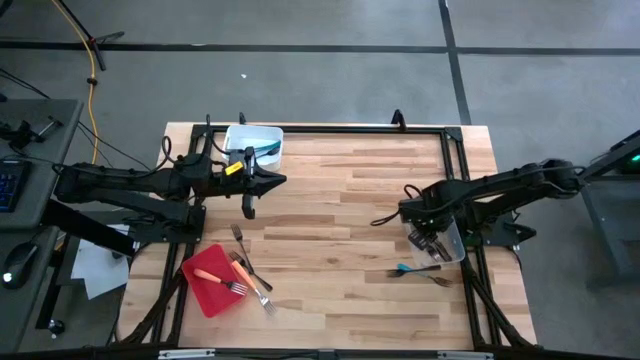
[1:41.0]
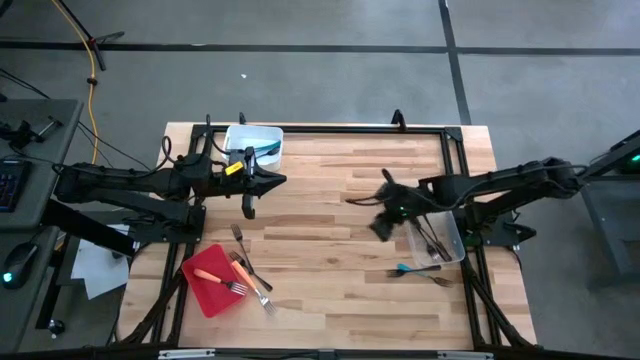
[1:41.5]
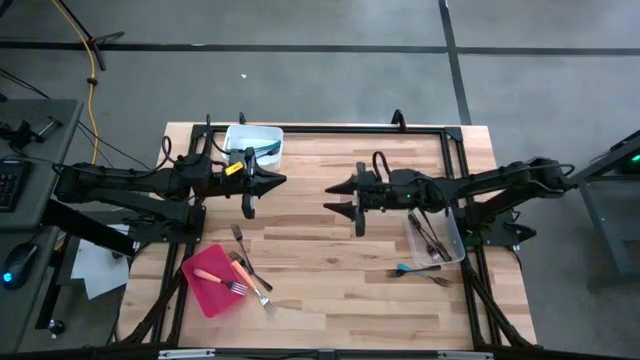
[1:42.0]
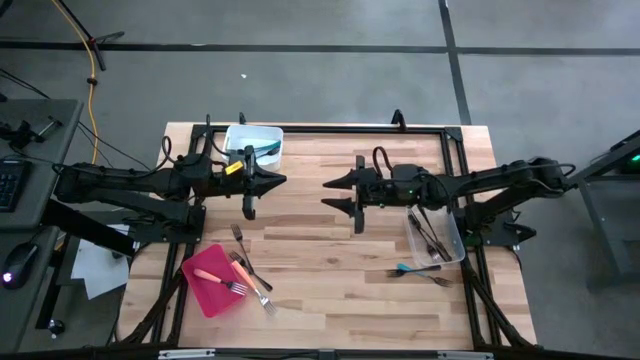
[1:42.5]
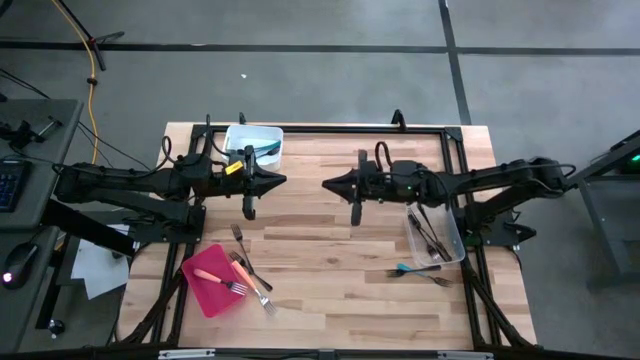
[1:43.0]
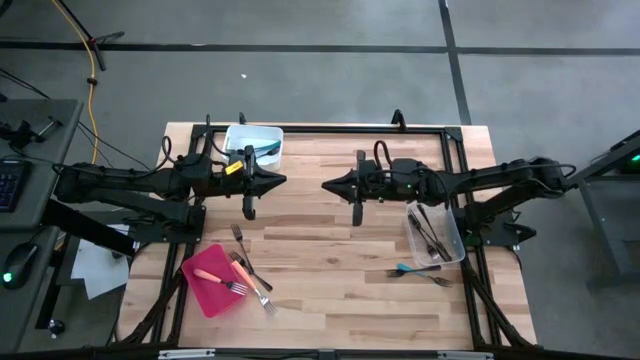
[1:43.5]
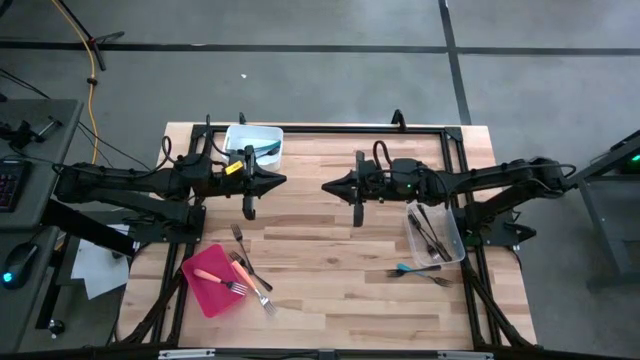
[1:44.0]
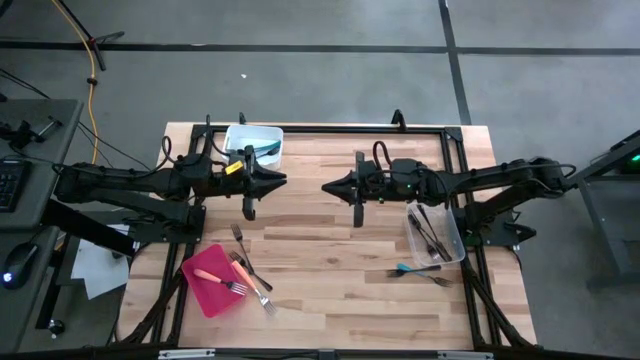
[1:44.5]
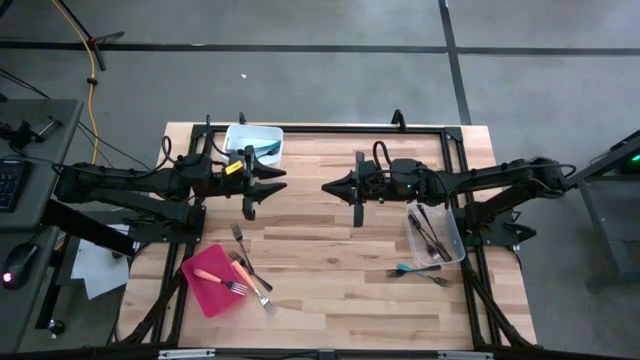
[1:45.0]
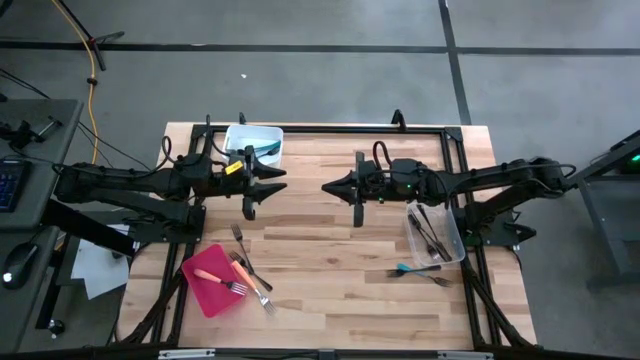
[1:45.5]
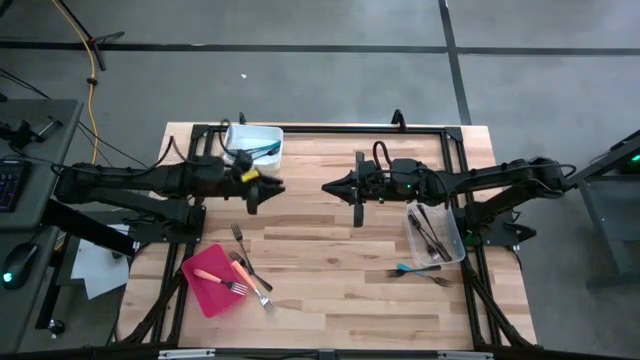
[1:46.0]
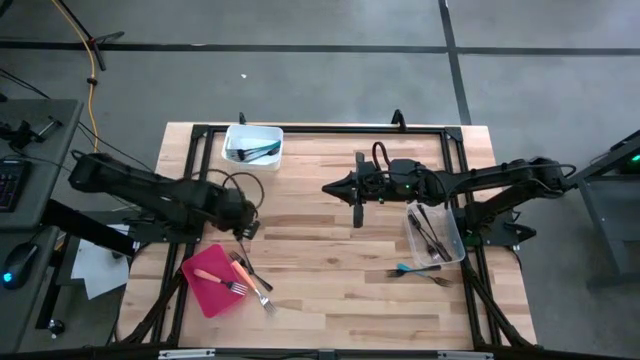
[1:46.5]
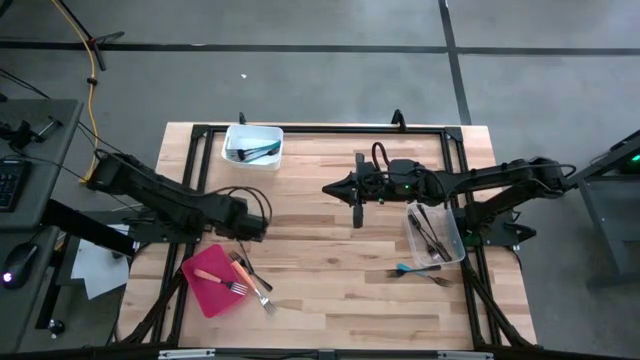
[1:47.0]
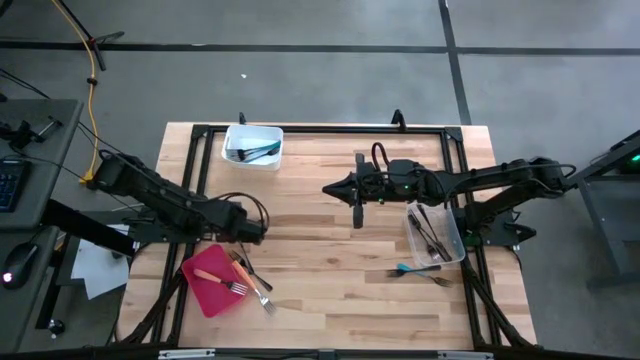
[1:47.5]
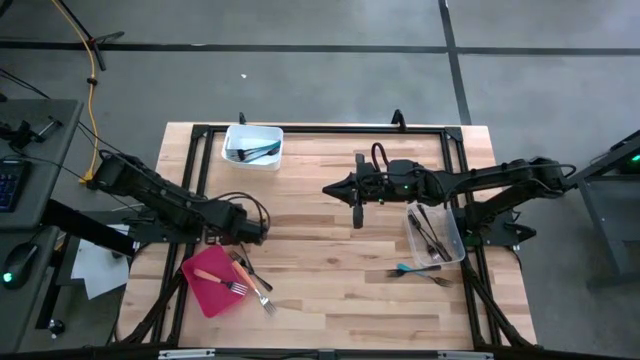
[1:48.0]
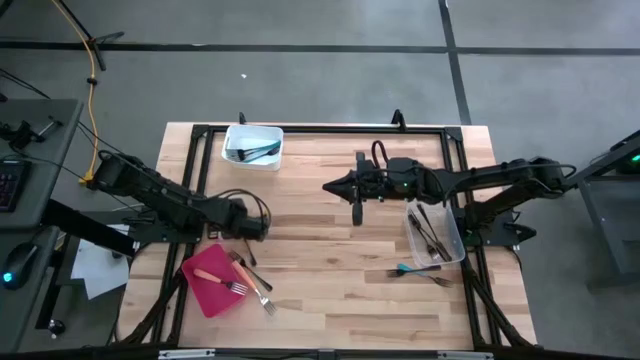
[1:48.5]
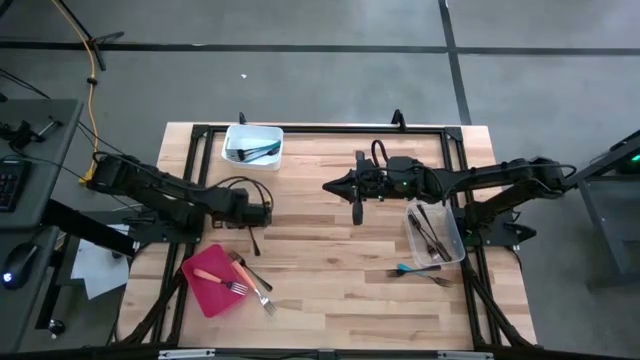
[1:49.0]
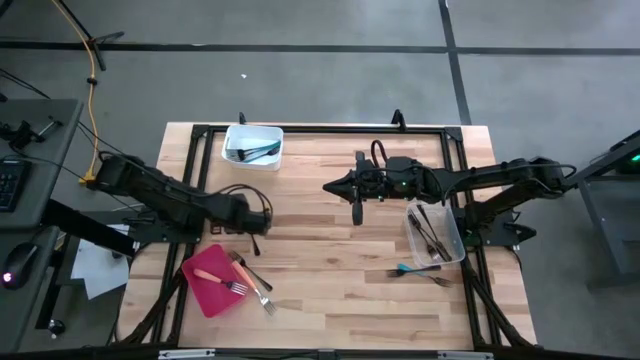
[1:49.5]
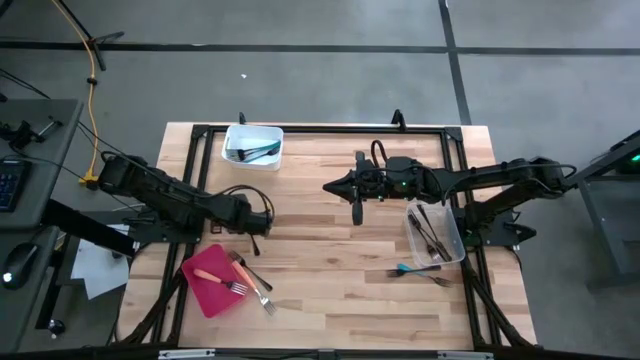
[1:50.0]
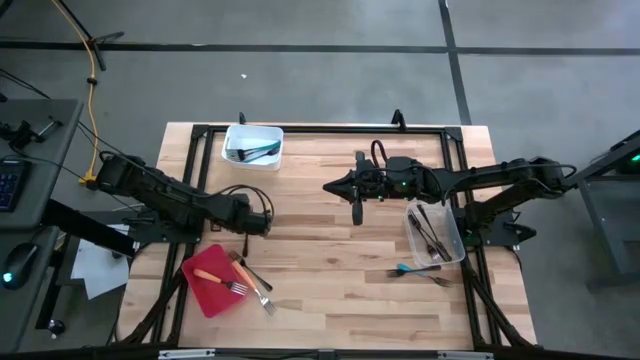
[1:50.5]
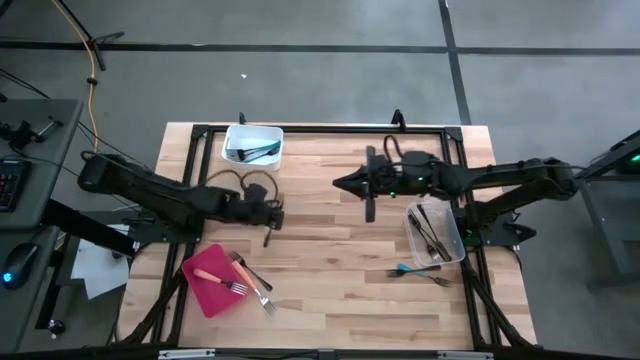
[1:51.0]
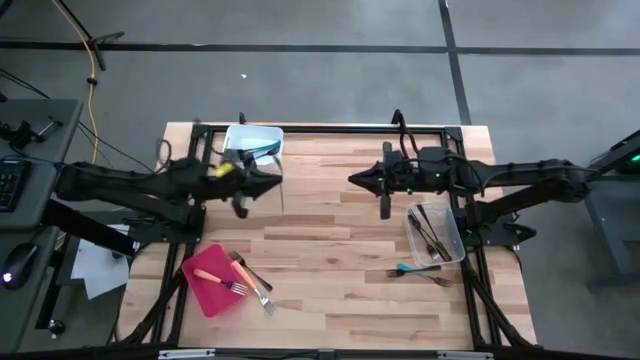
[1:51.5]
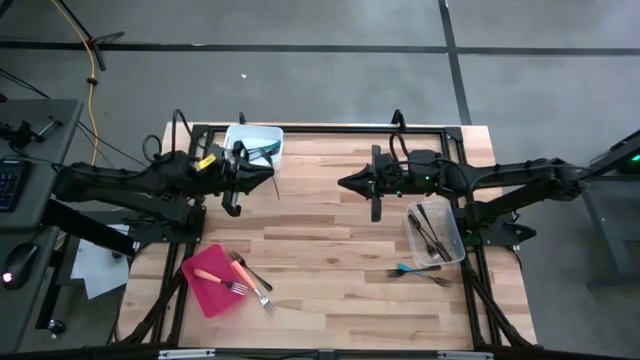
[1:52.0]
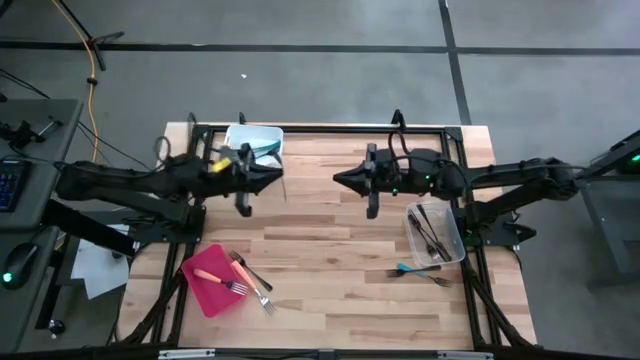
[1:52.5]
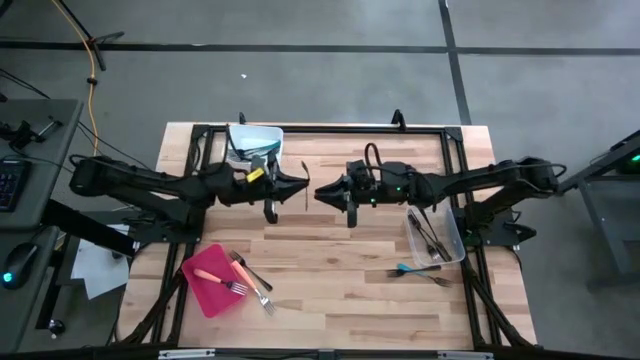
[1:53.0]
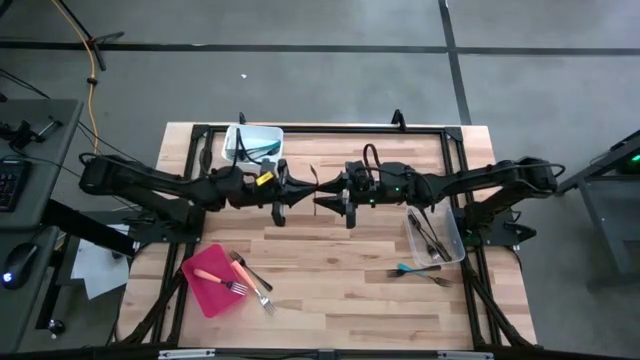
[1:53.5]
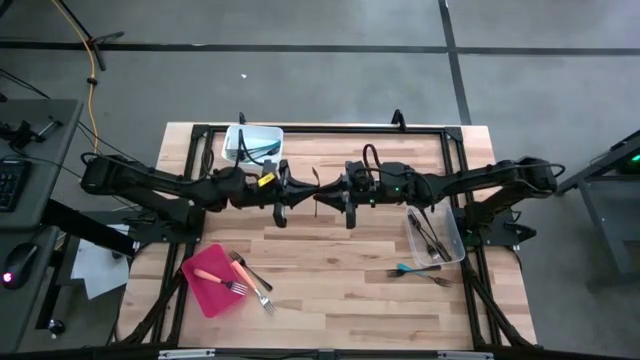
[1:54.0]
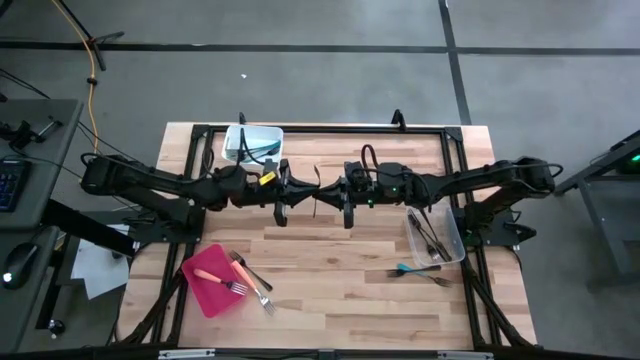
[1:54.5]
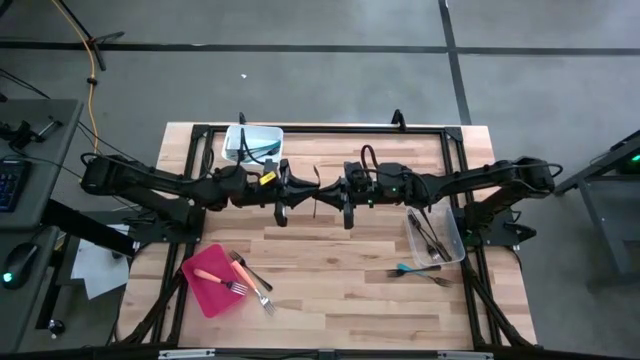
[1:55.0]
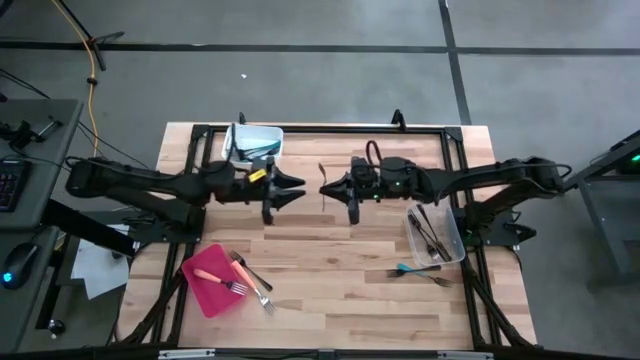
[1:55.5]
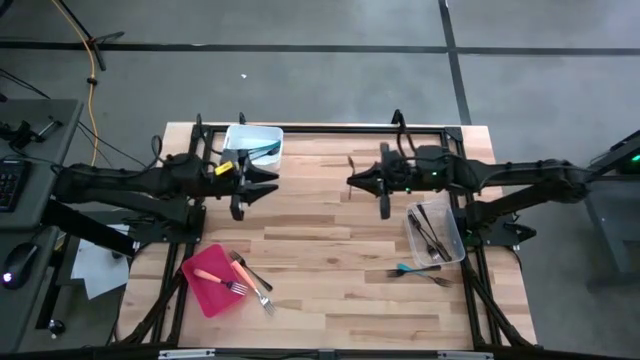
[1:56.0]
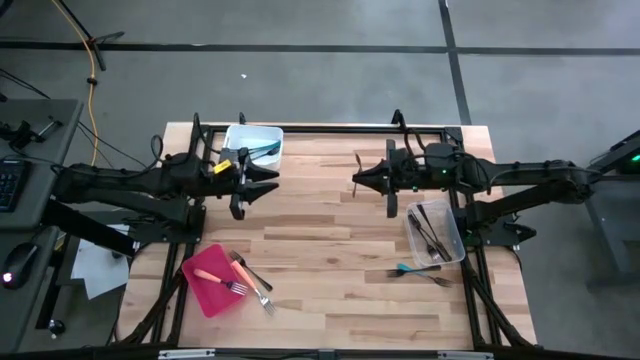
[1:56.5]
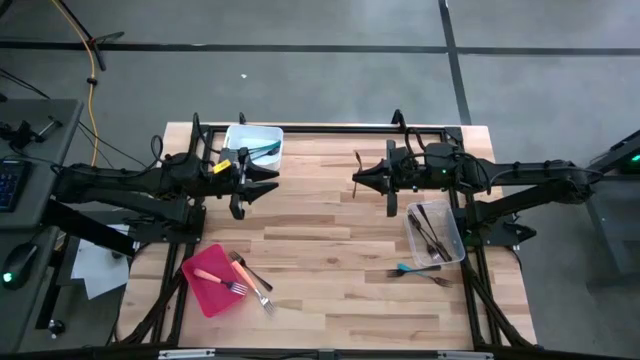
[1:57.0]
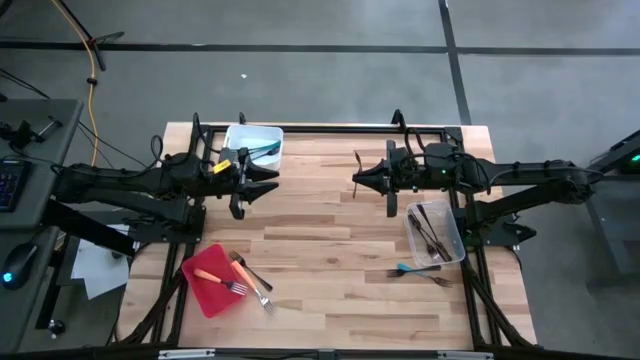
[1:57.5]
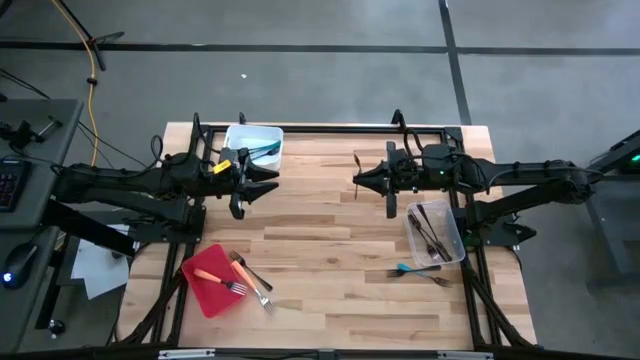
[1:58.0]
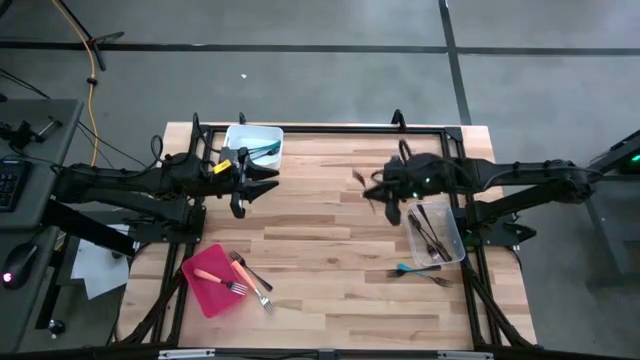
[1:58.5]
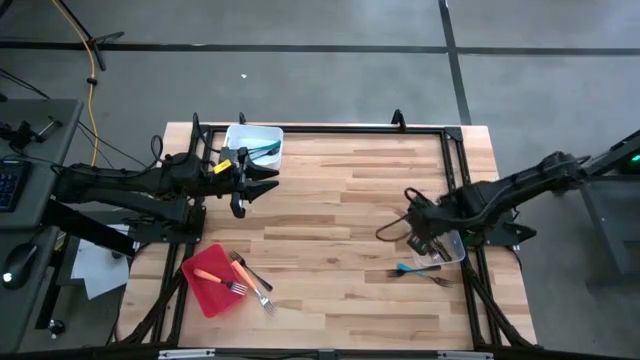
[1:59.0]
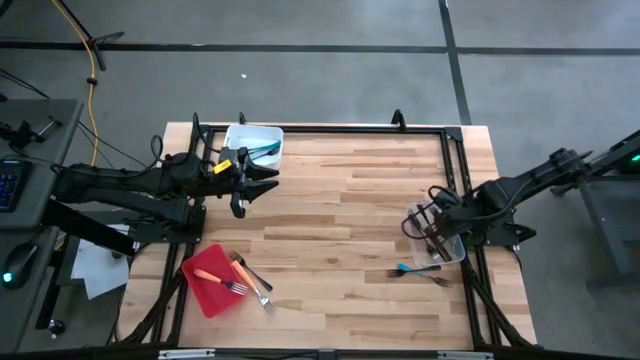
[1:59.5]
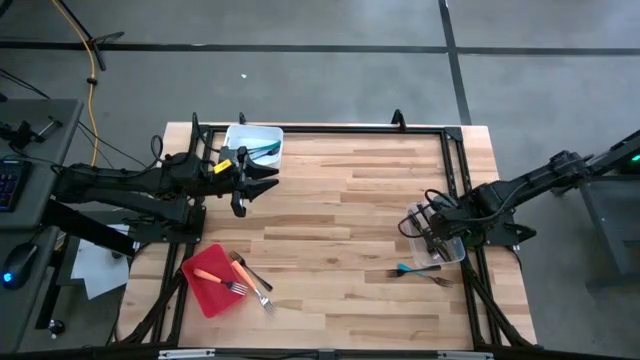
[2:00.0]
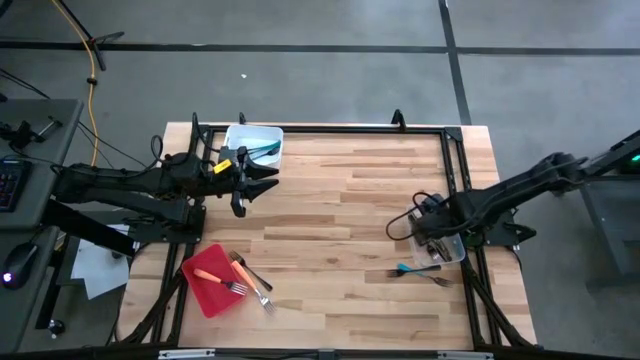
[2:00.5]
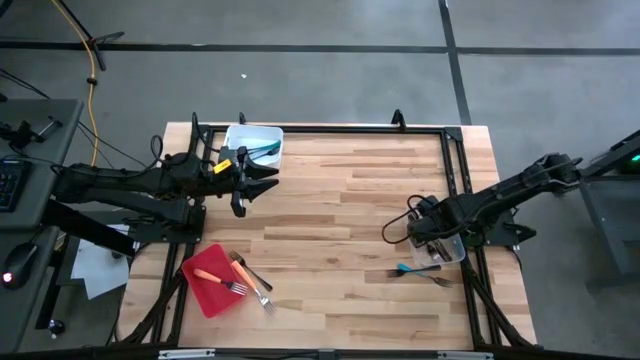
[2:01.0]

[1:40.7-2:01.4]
Task: Sort silverware by color (type)
Put the black fork into the transparent bin
